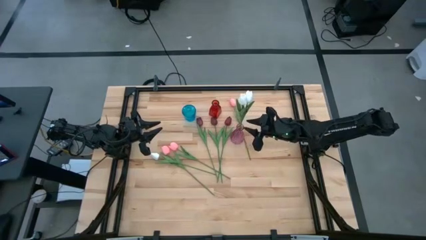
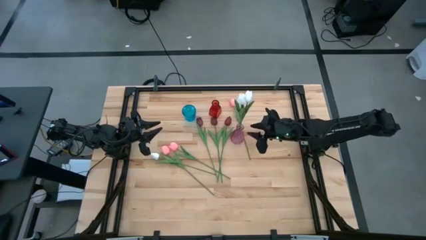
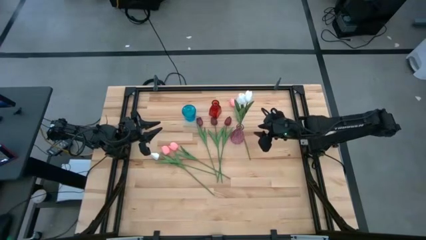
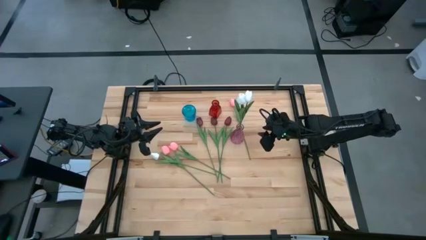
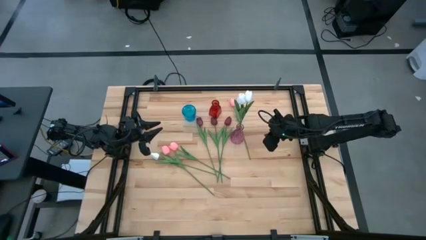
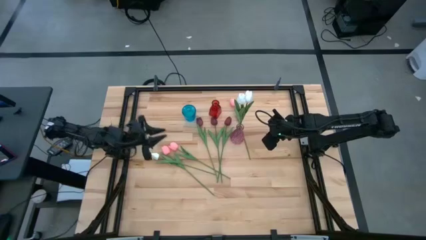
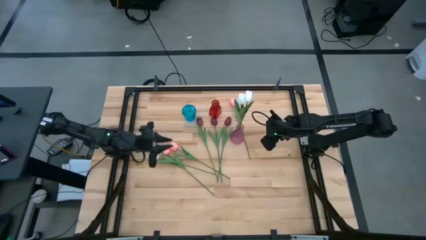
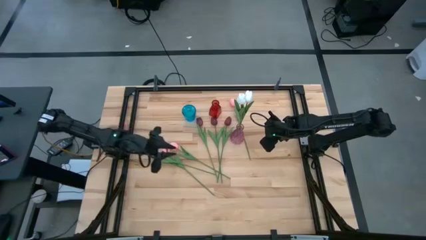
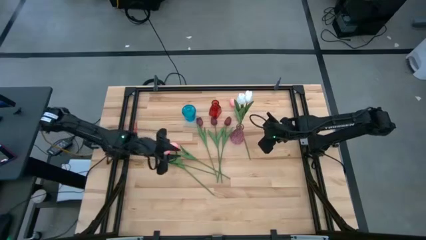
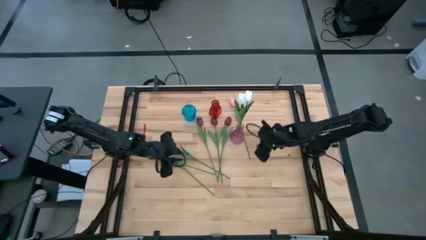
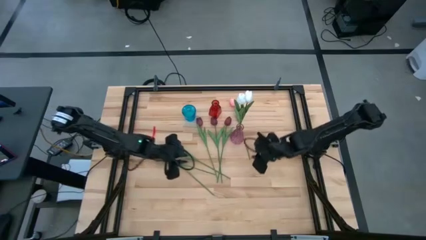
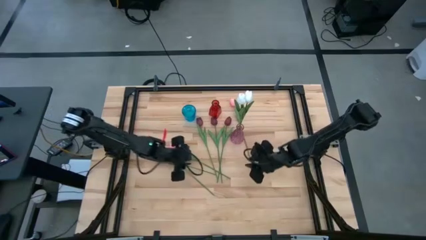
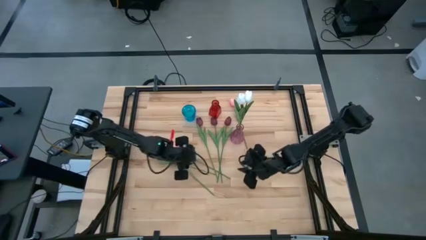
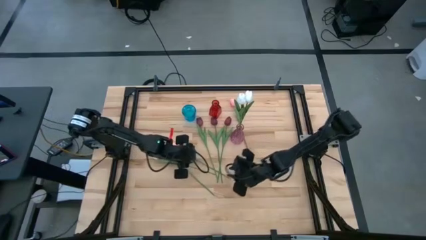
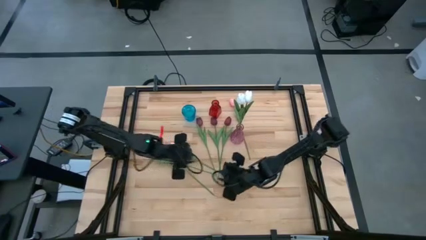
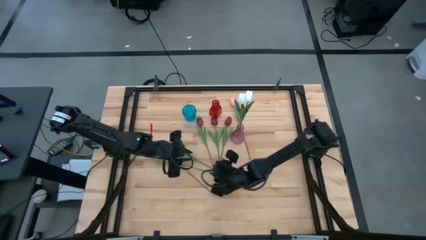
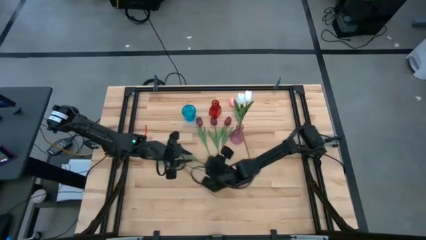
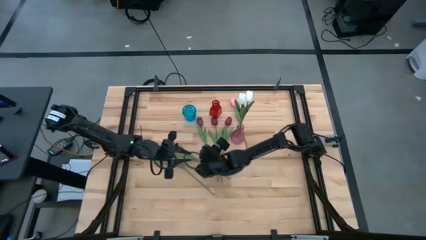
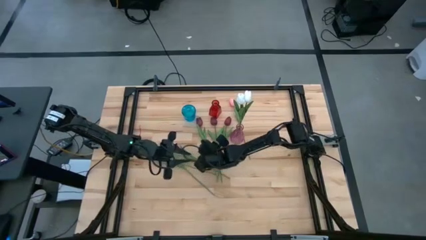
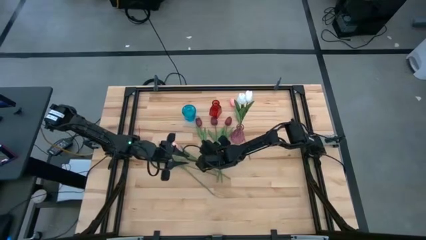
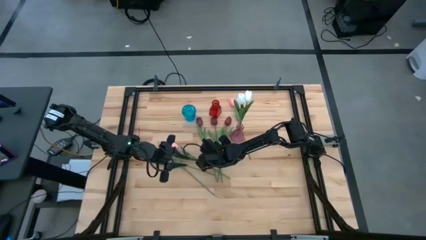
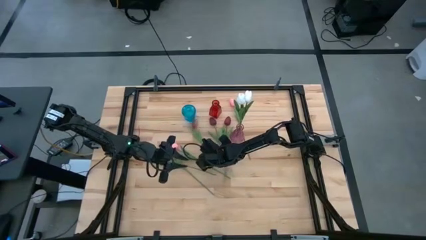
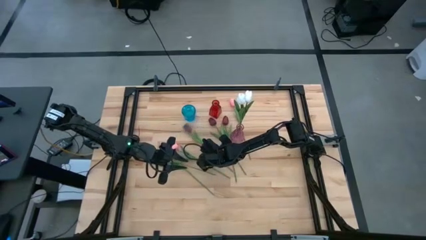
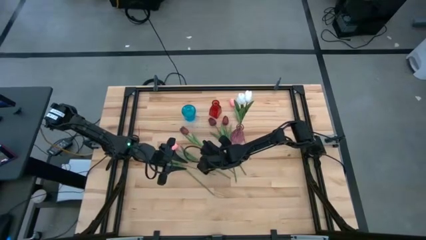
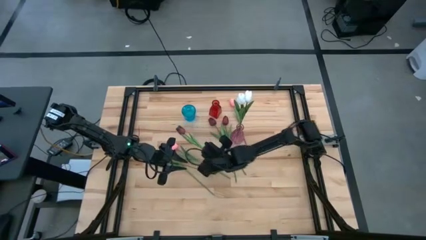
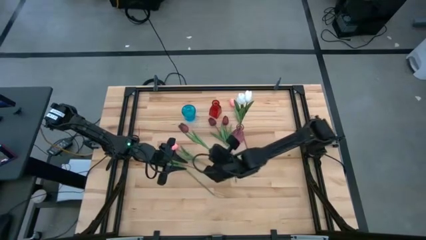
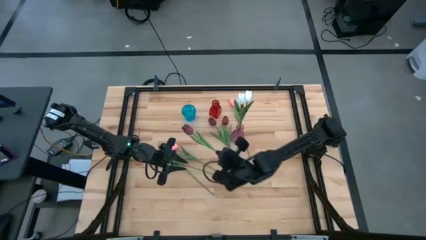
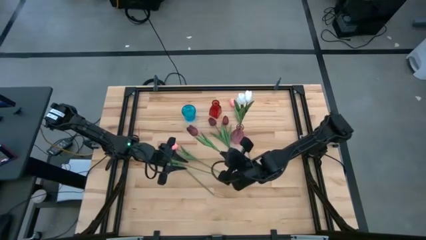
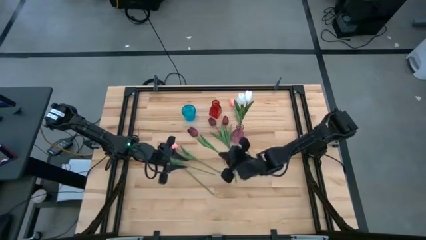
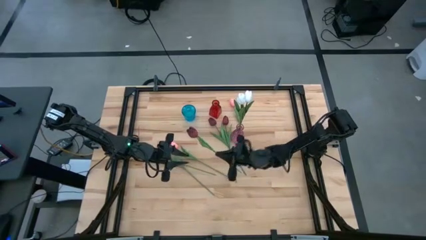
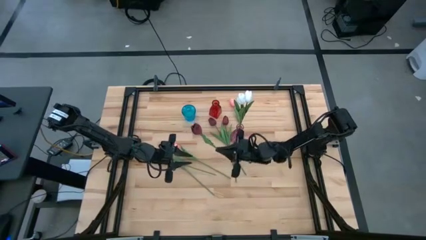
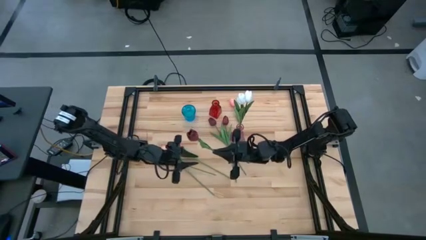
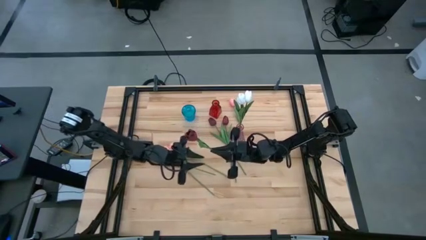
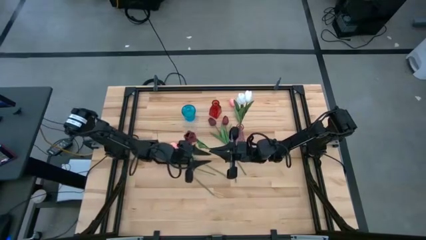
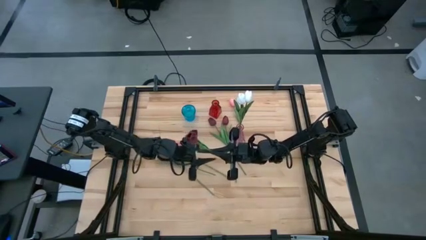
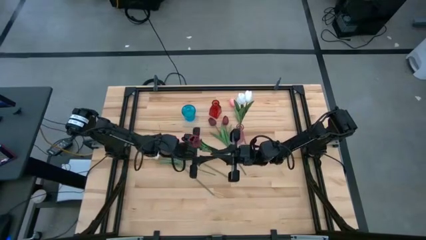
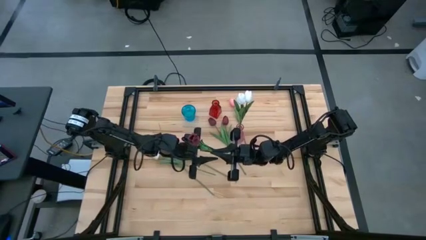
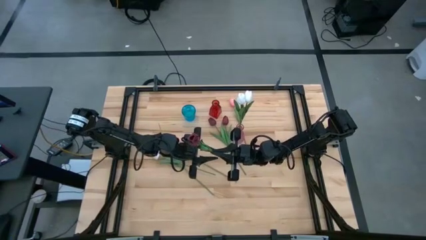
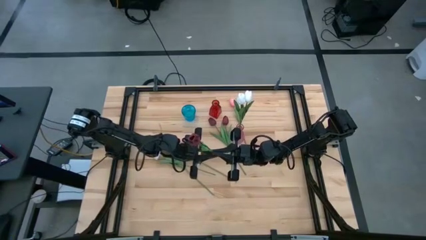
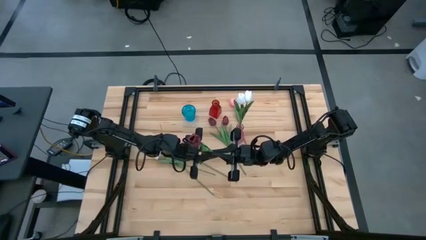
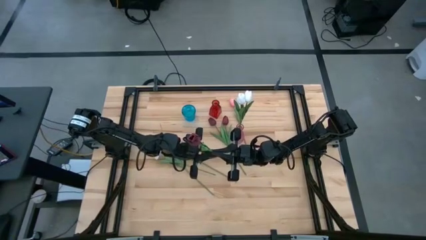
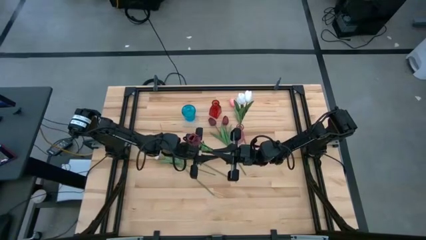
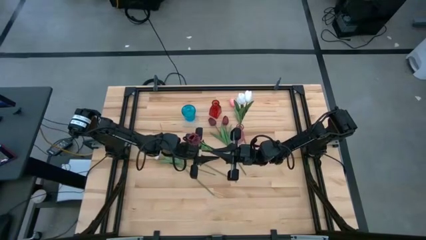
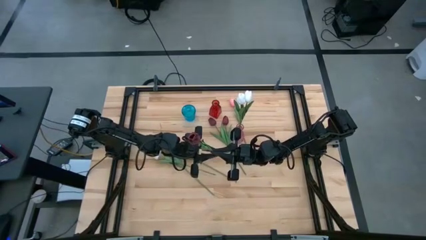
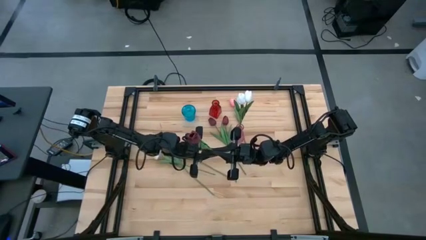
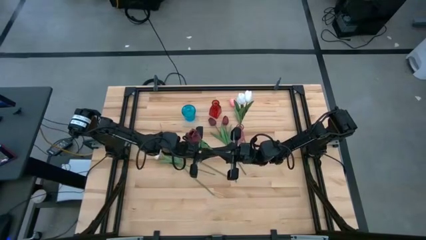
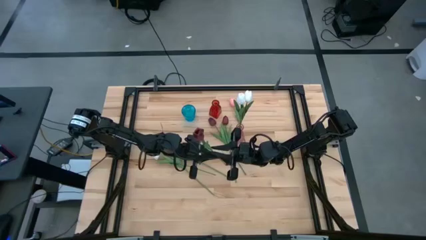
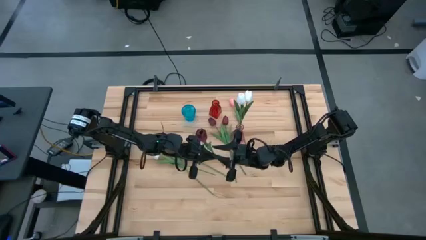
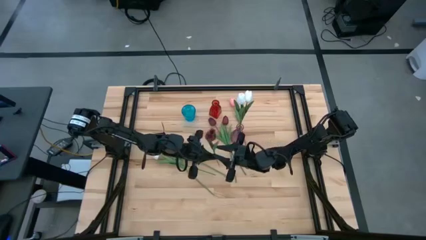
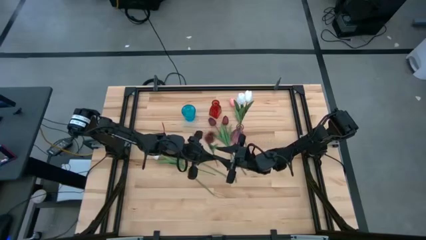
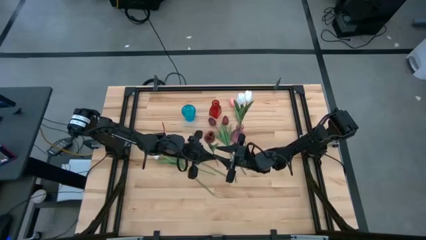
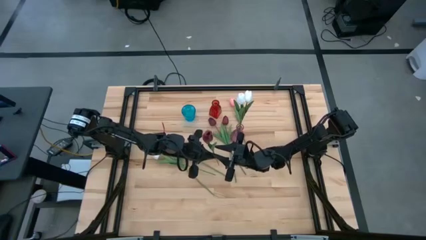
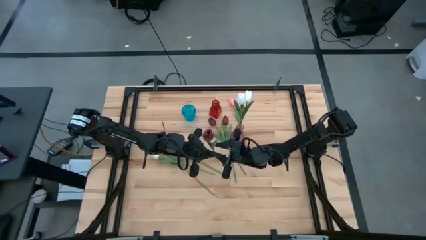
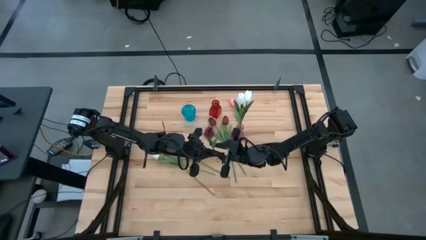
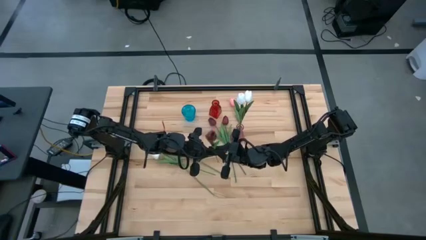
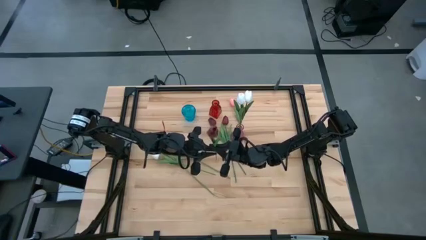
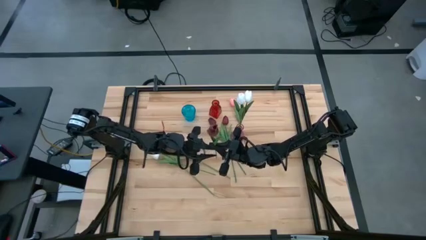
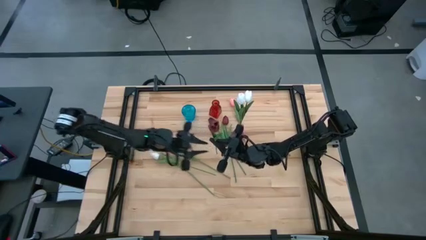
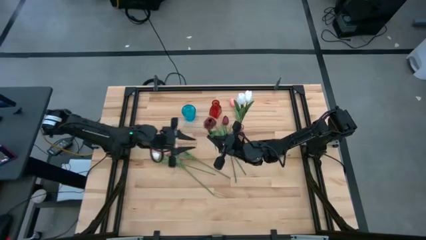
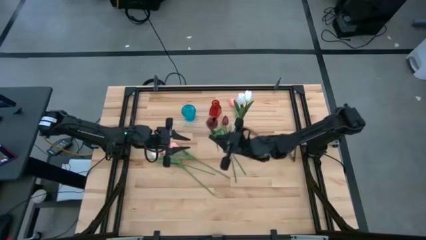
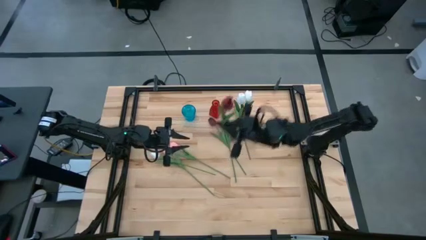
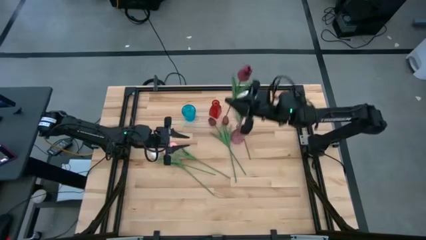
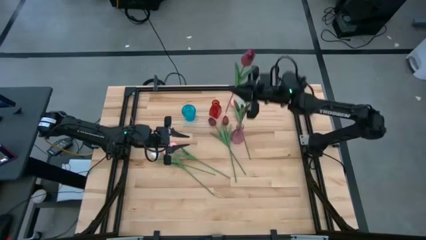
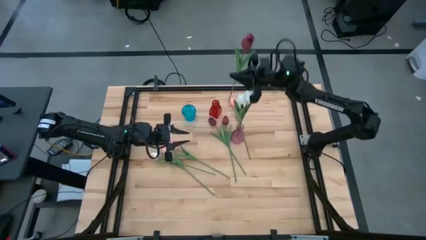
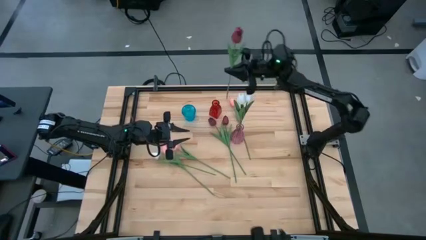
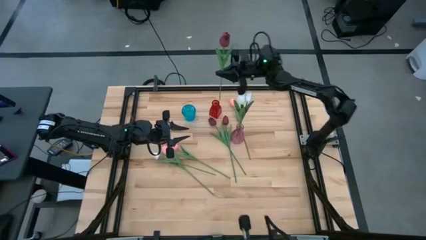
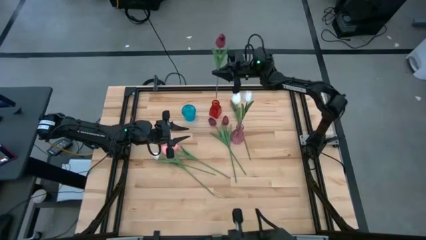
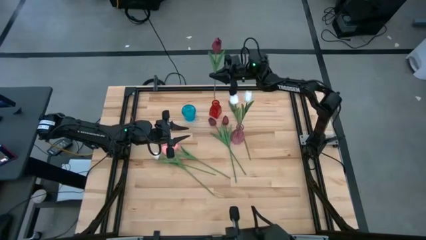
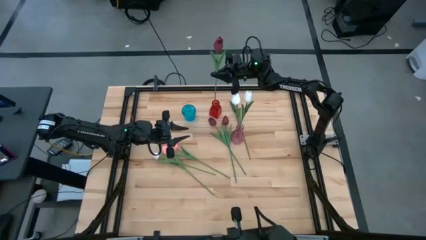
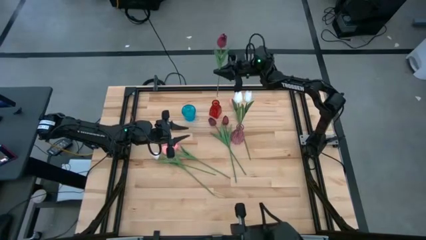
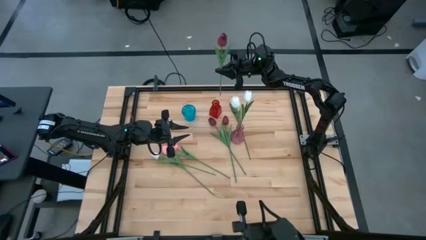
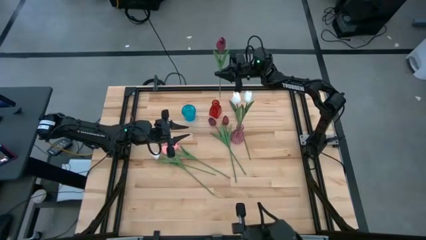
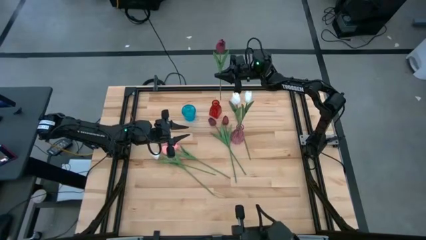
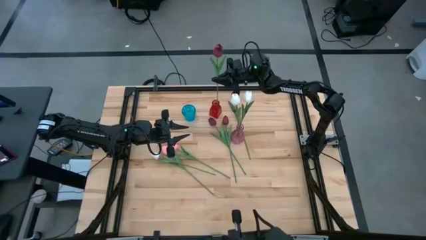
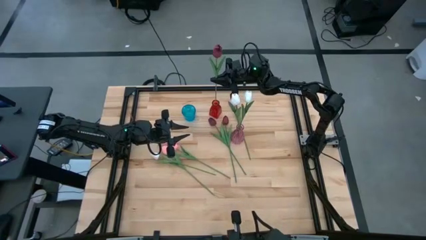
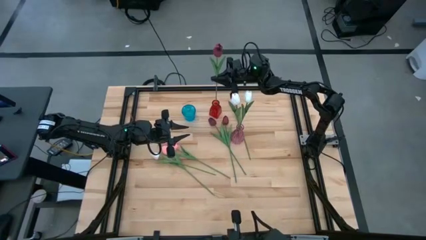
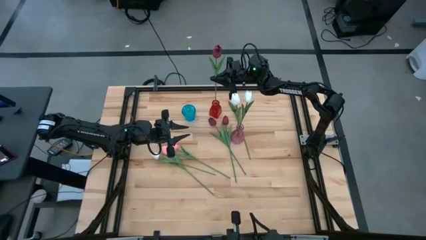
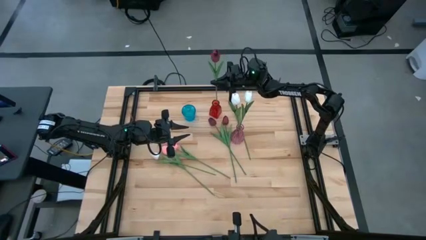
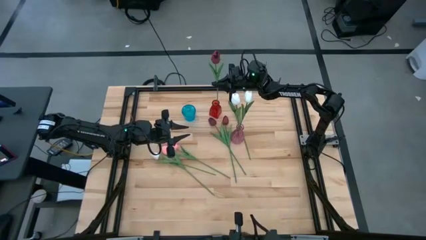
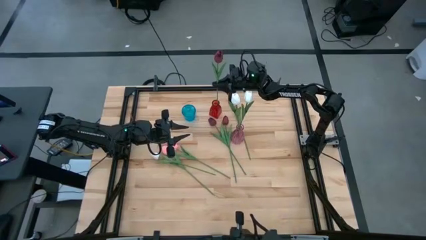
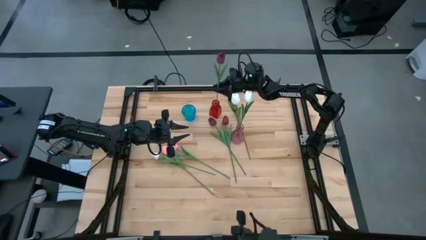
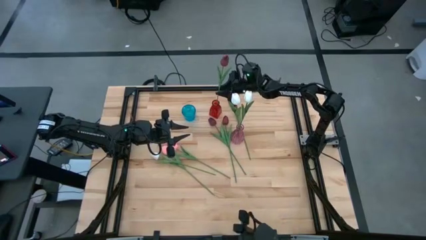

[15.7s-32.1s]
Task: Sort flowers into vase by color
Put the left red flower into the red vase
